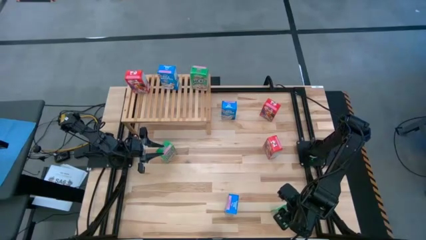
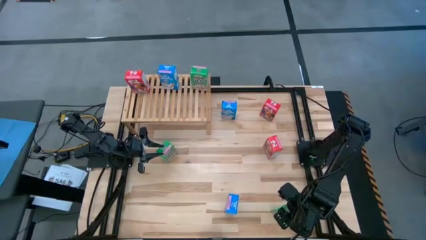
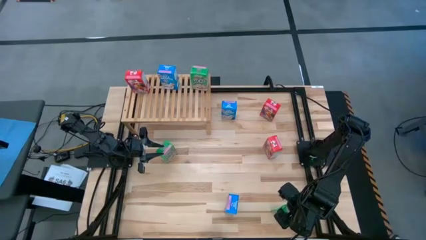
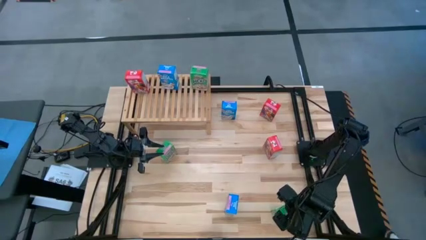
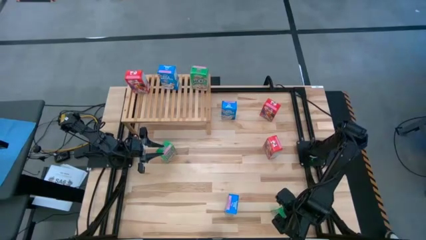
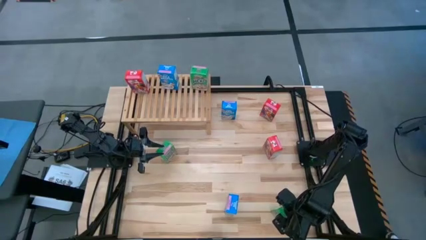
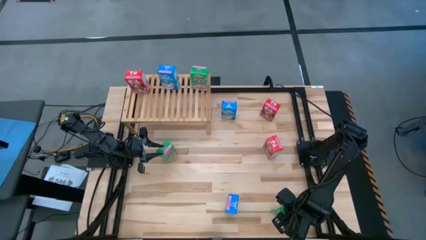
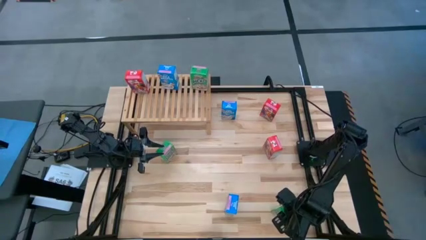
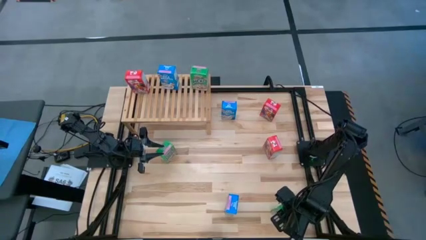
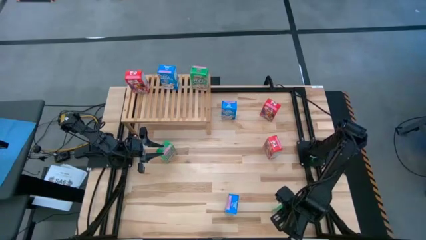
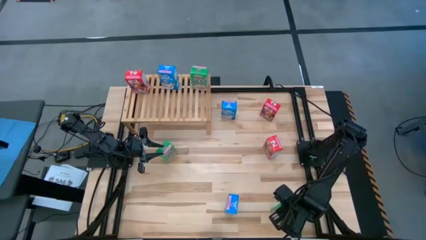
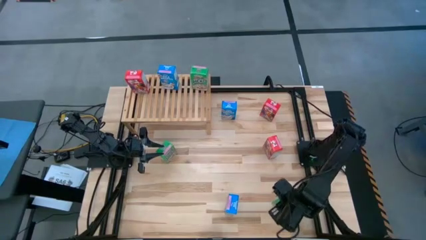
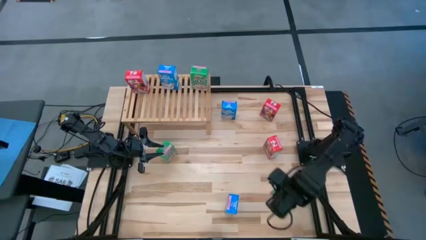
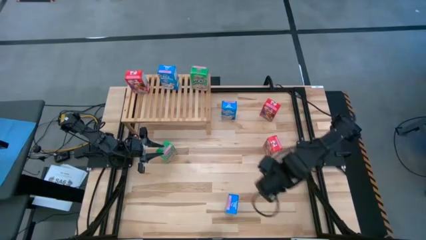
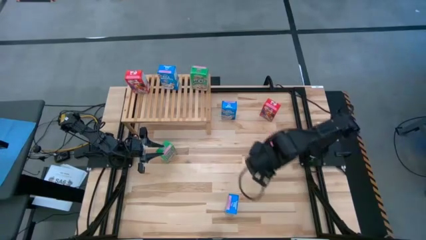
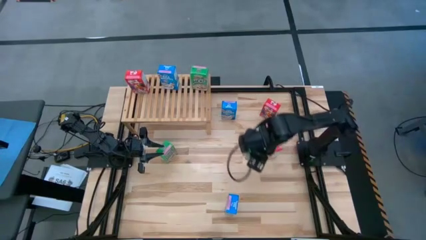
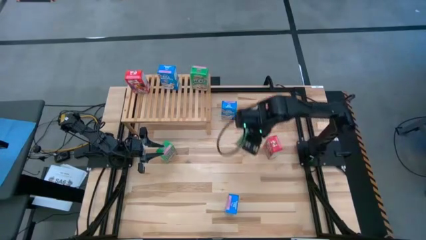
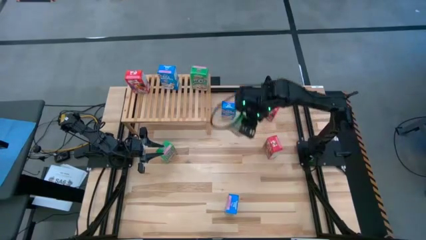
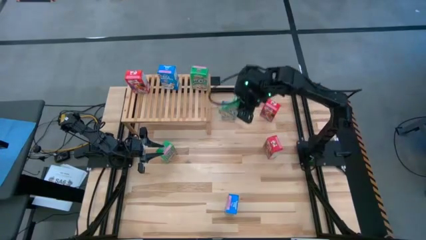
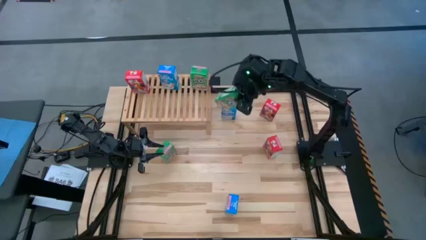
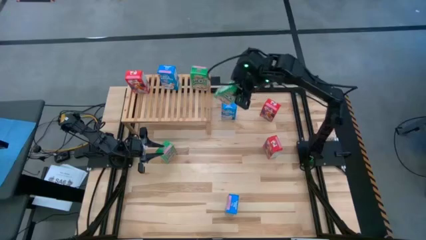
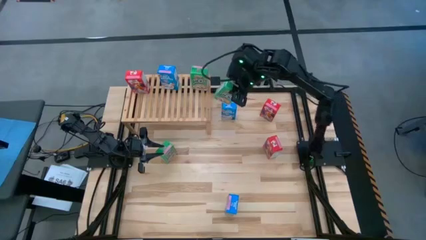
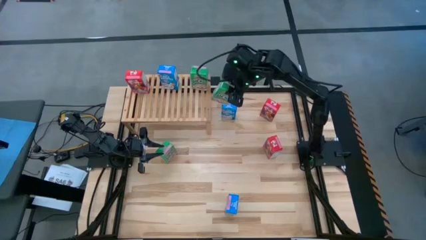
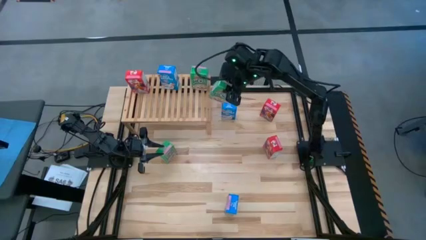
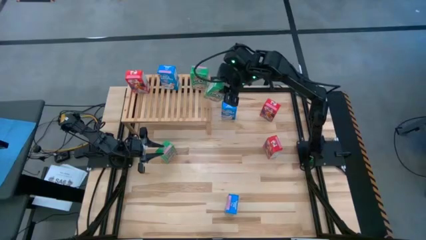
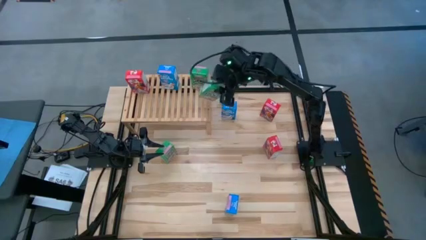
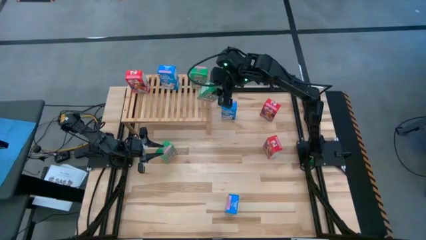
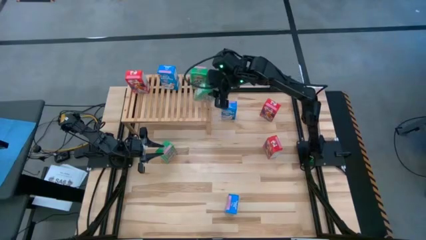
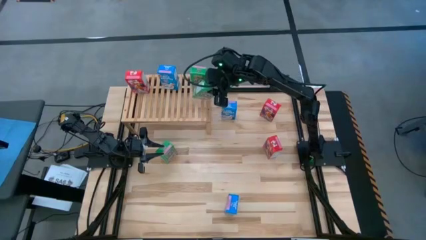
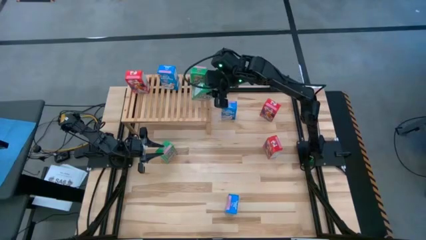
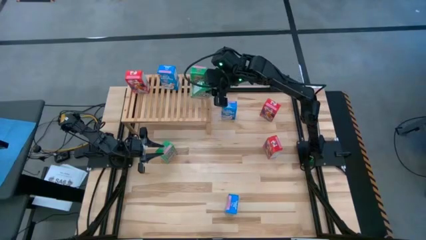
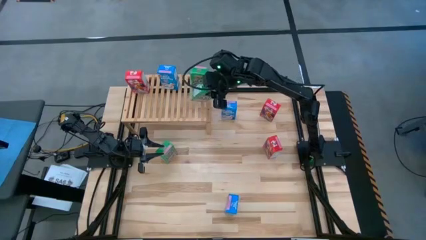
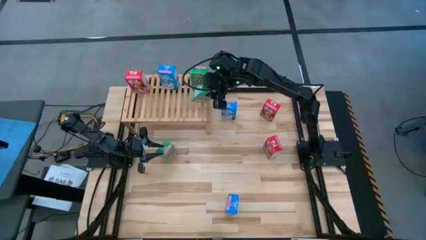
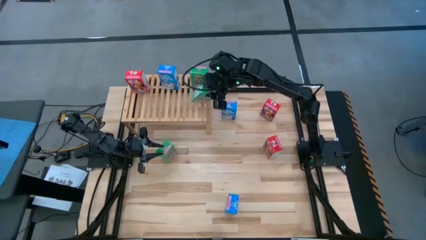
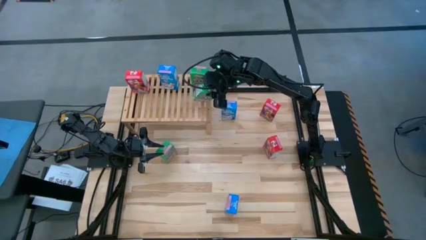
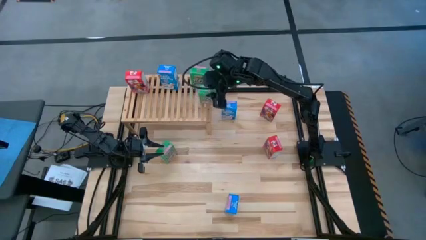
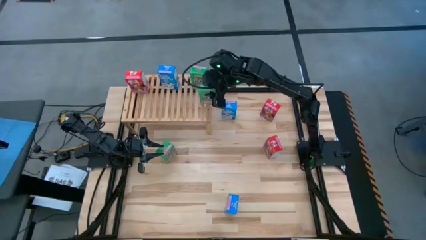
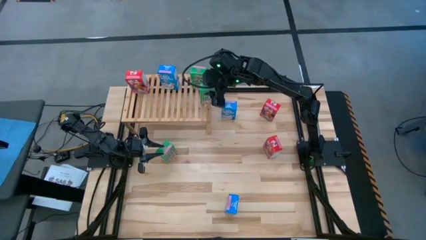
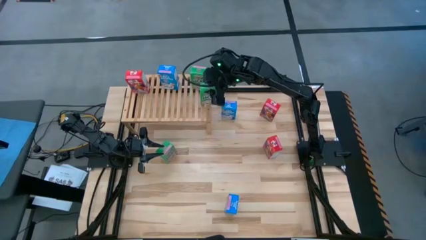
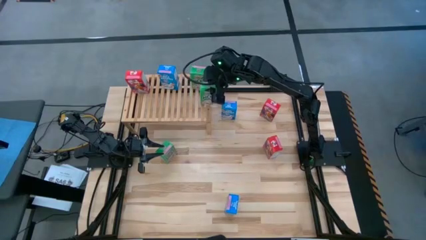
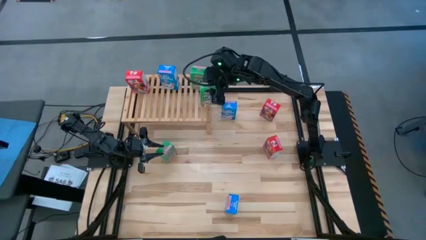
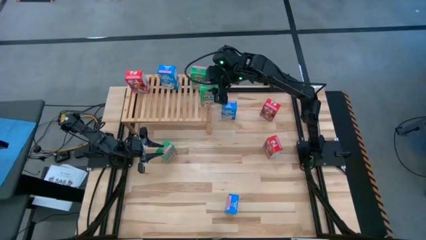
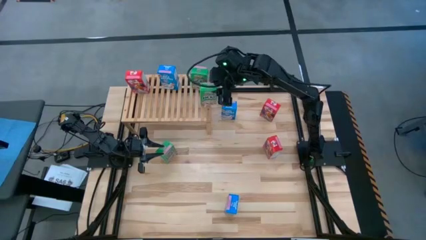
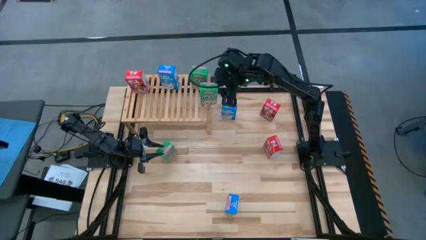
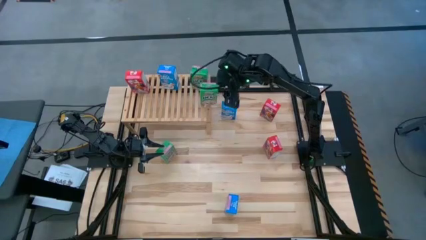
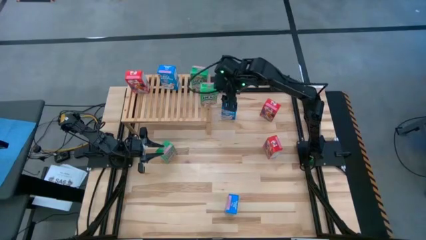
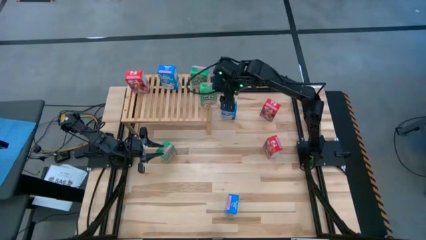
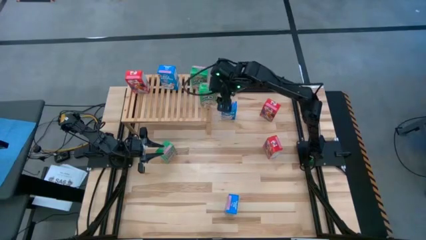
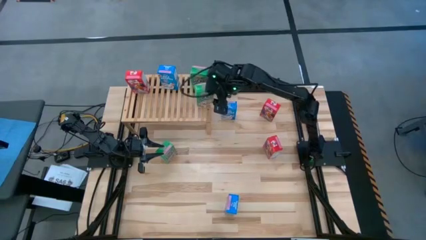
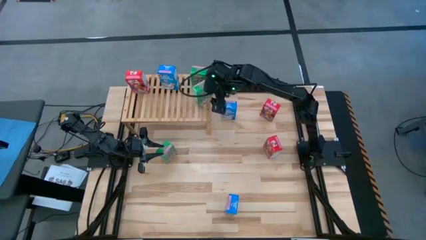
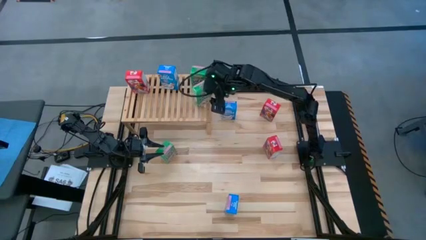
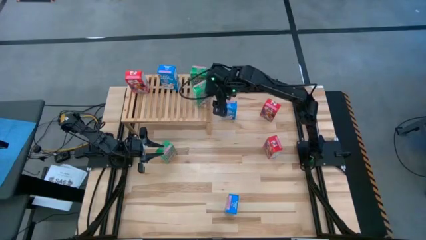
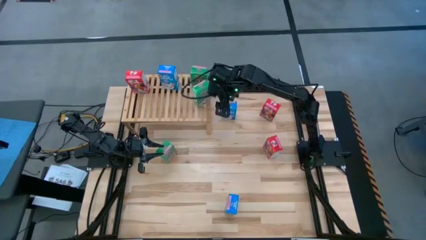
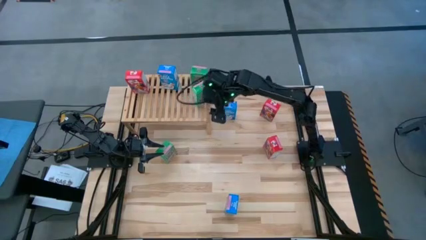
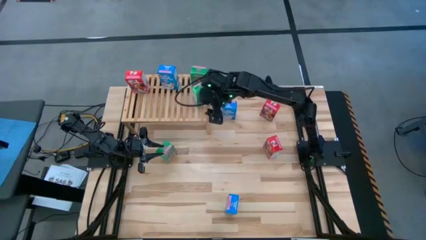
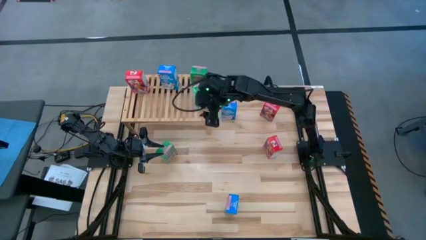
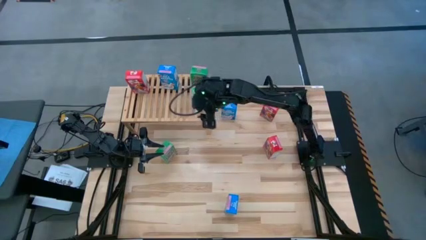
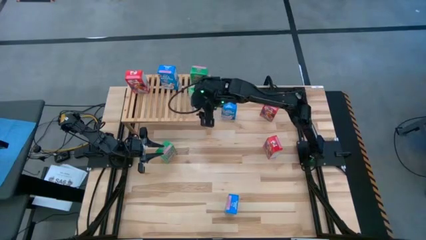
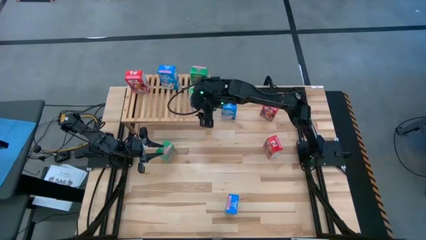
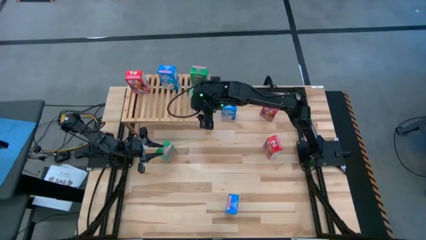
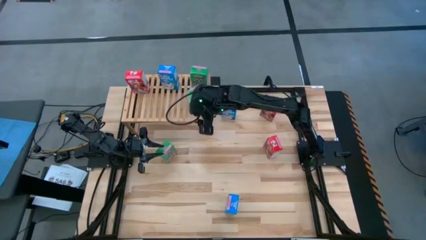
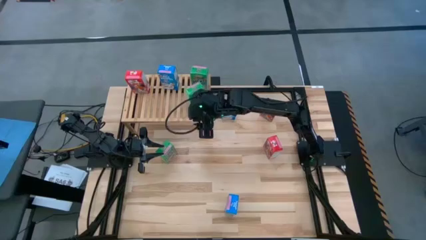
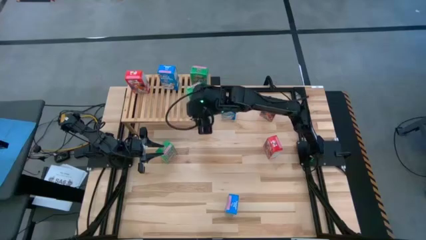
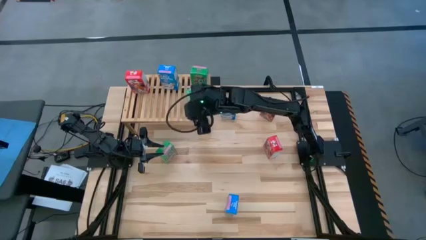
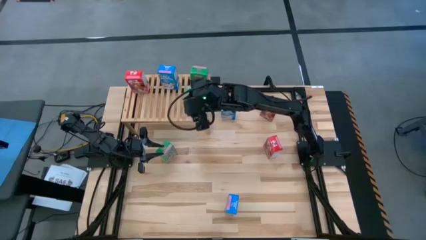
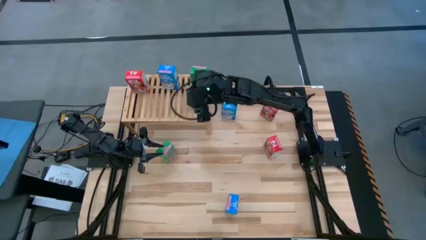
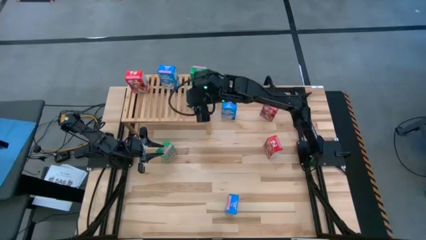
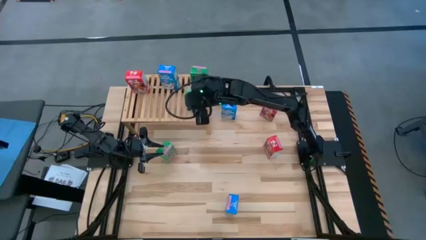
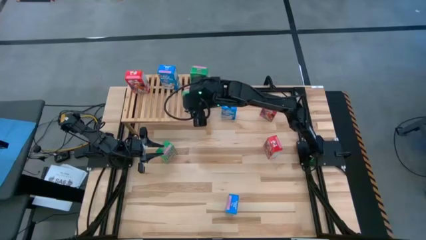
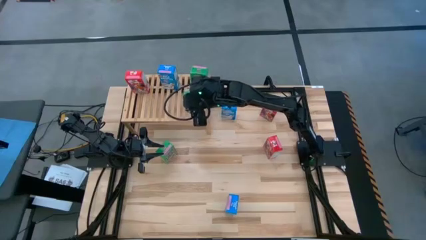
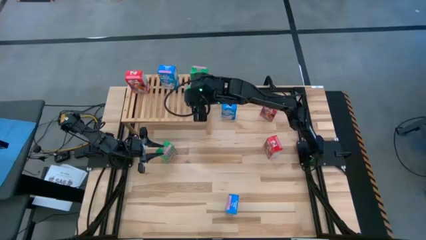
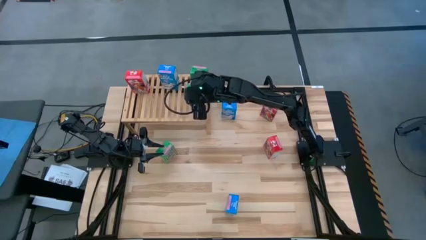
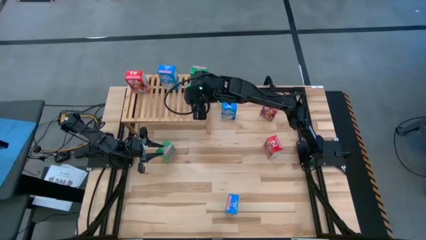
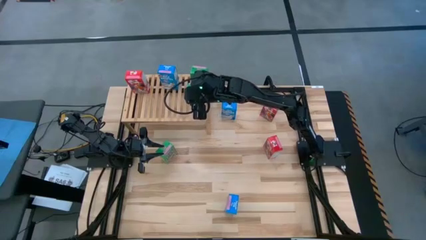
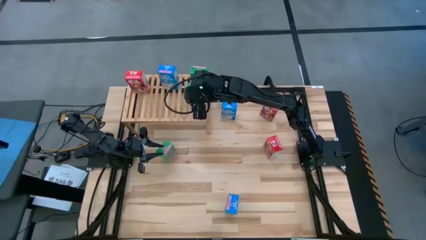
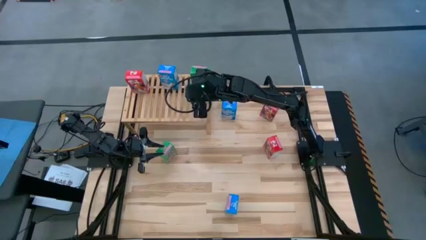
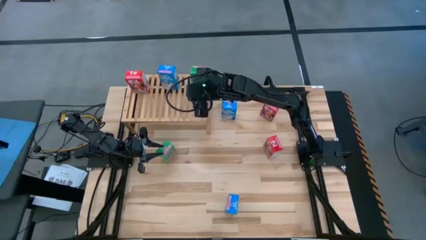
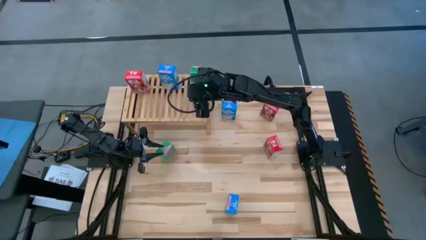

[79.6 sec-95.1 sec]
Task: Stack cereal on shelf
Put the bottom green cereal box on the shelf aligned with the green cereal box
